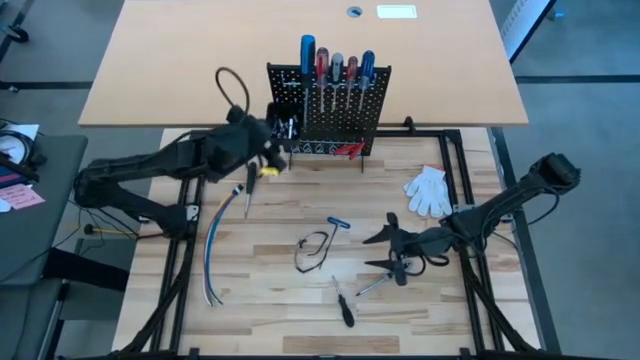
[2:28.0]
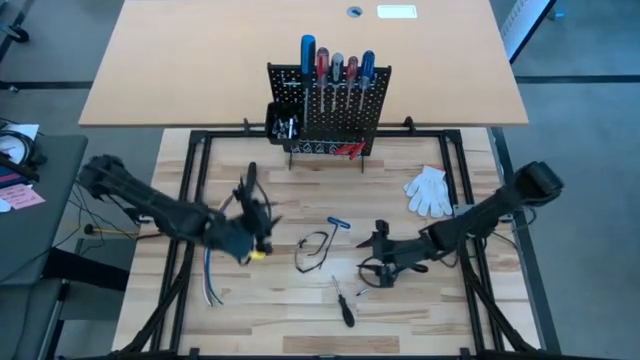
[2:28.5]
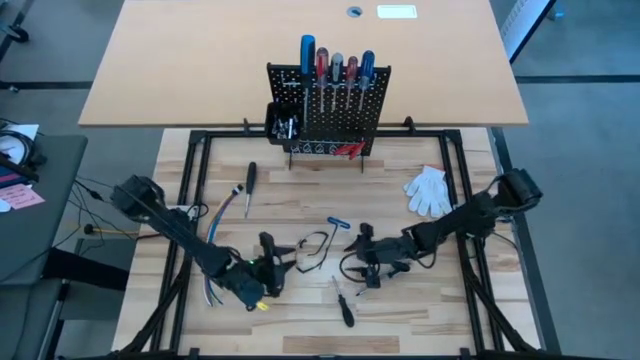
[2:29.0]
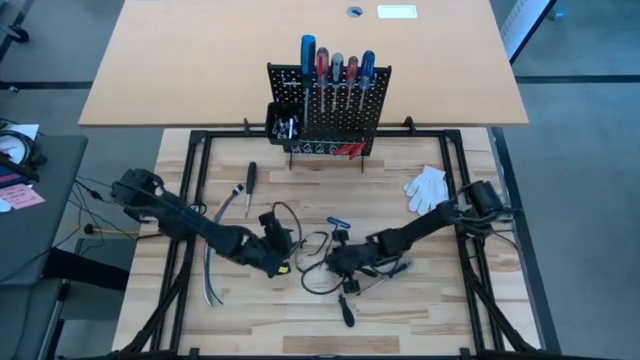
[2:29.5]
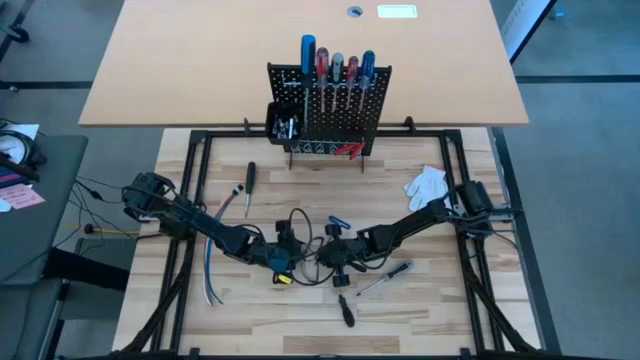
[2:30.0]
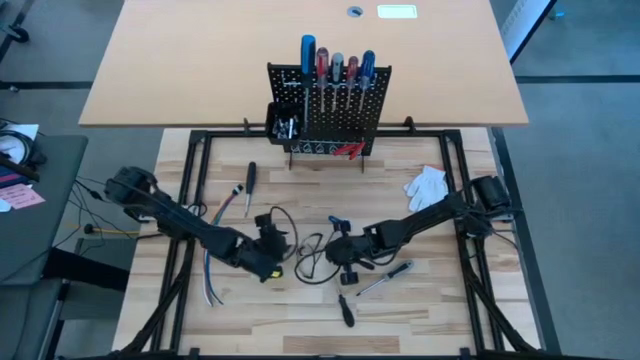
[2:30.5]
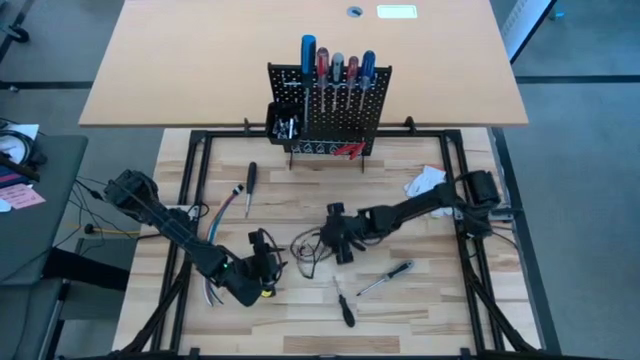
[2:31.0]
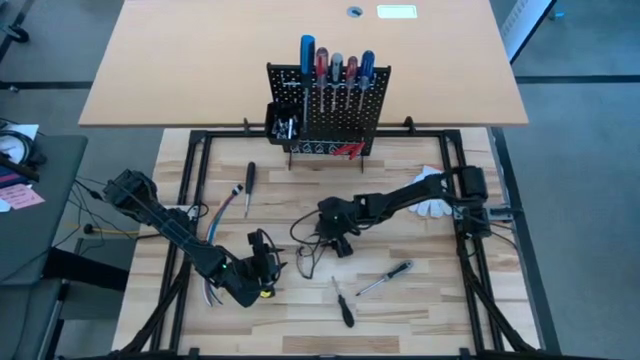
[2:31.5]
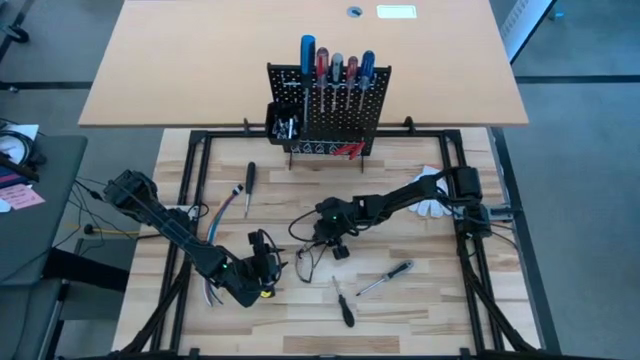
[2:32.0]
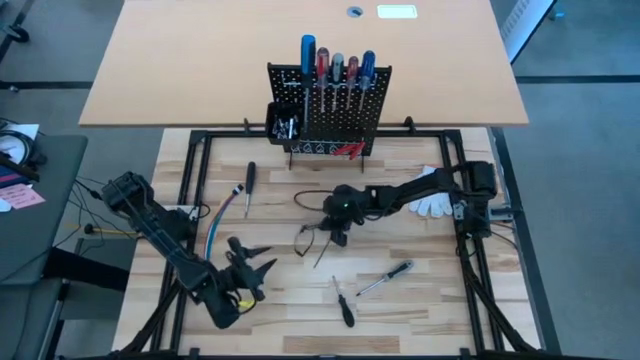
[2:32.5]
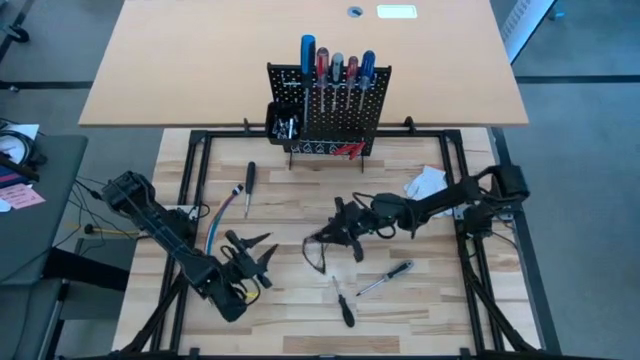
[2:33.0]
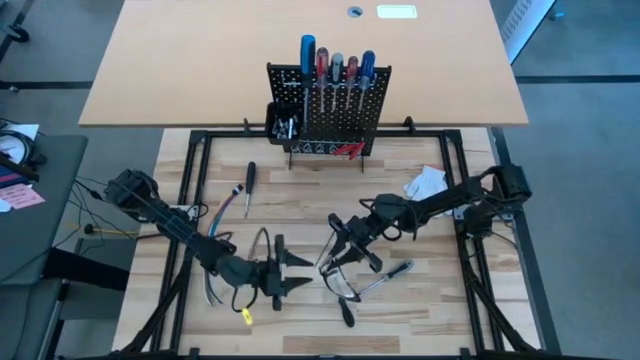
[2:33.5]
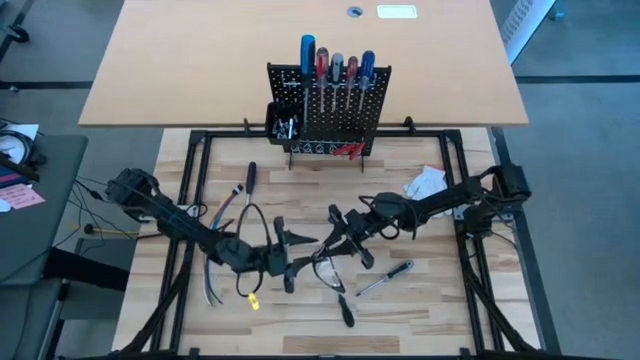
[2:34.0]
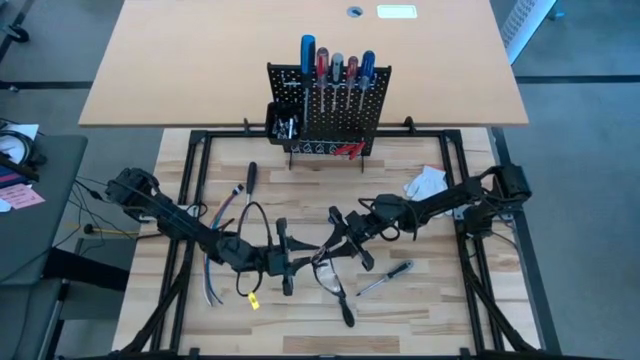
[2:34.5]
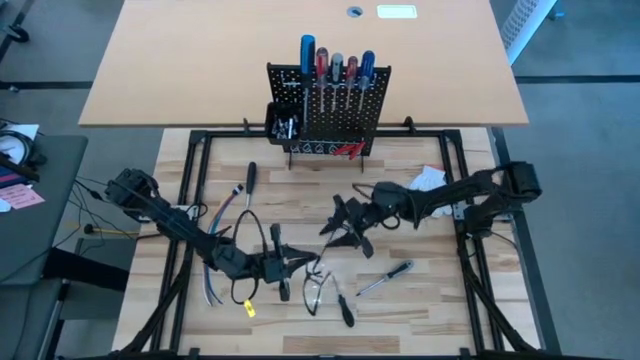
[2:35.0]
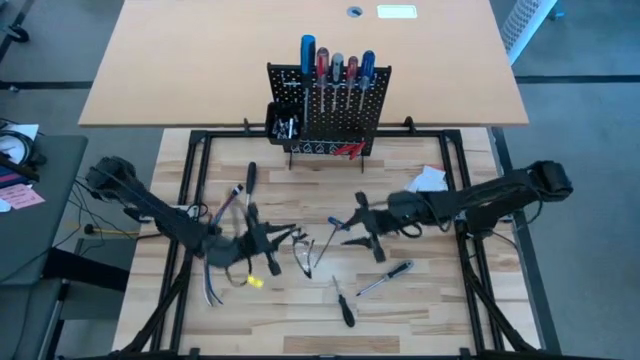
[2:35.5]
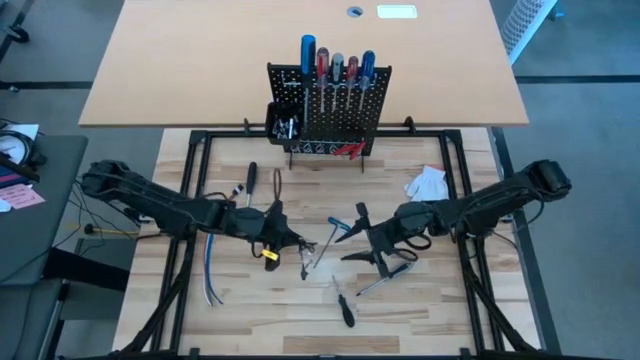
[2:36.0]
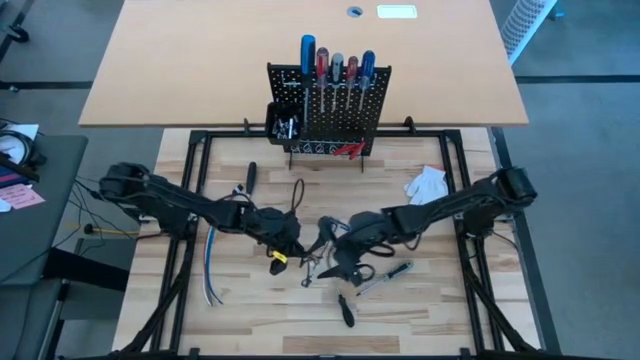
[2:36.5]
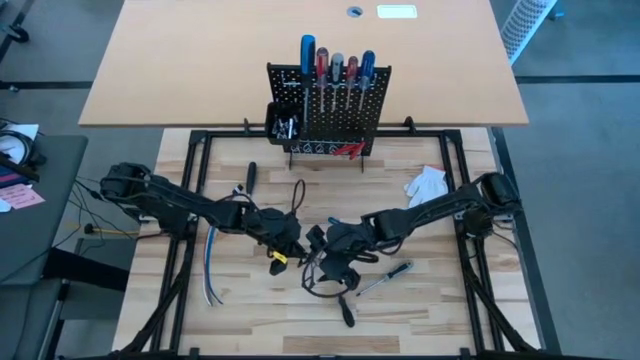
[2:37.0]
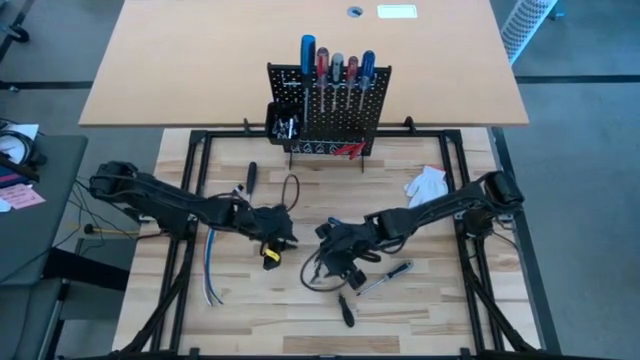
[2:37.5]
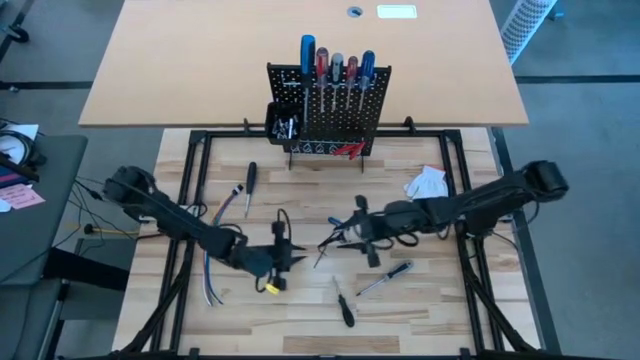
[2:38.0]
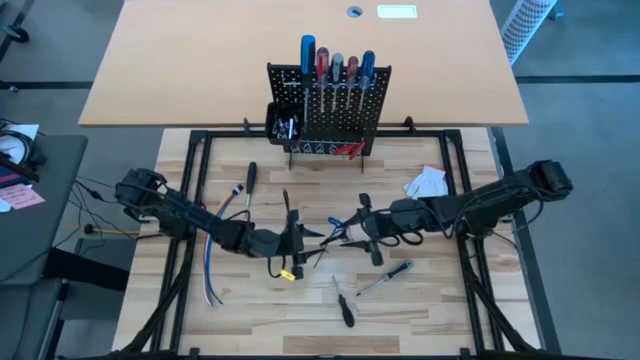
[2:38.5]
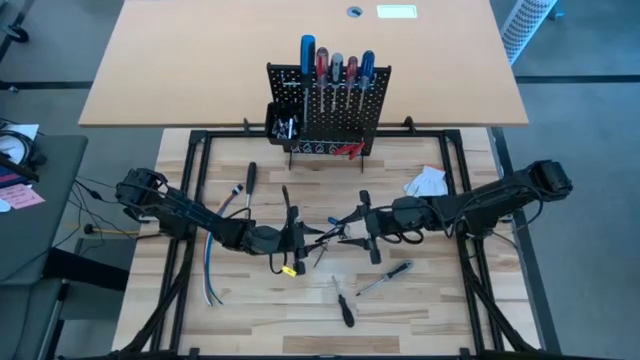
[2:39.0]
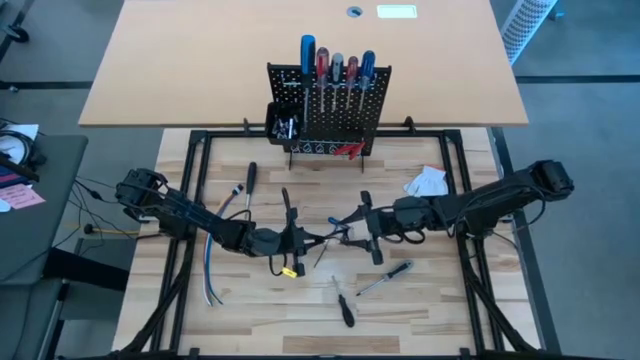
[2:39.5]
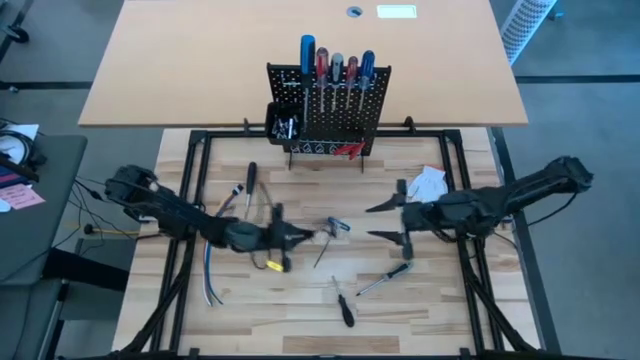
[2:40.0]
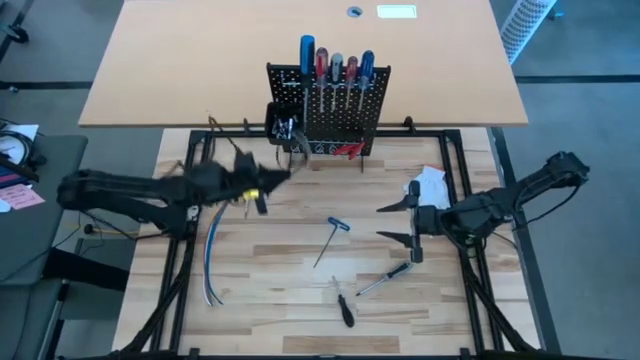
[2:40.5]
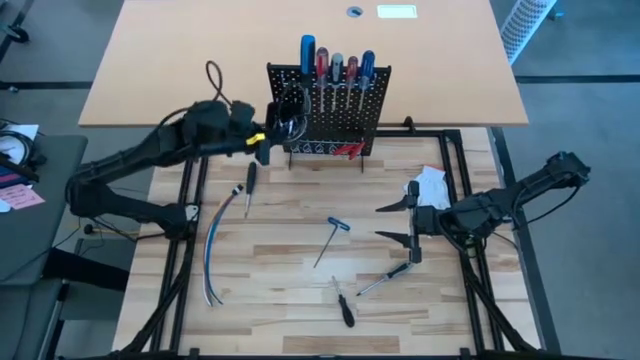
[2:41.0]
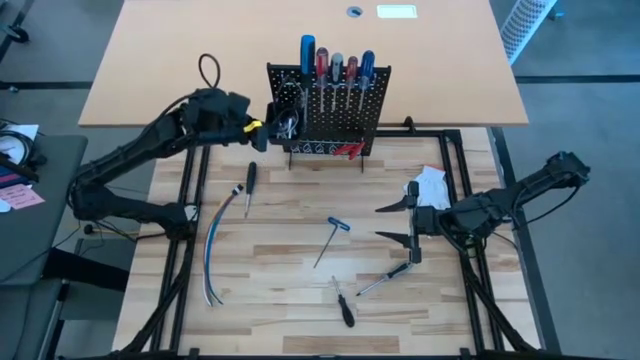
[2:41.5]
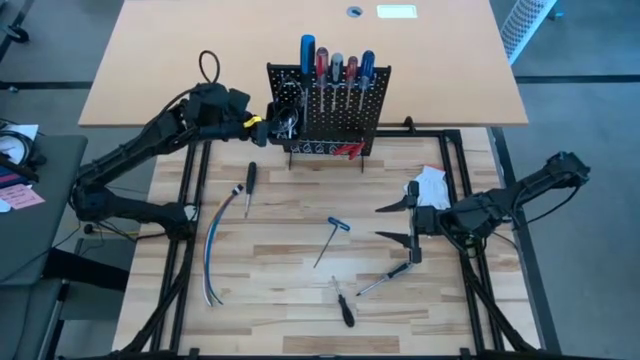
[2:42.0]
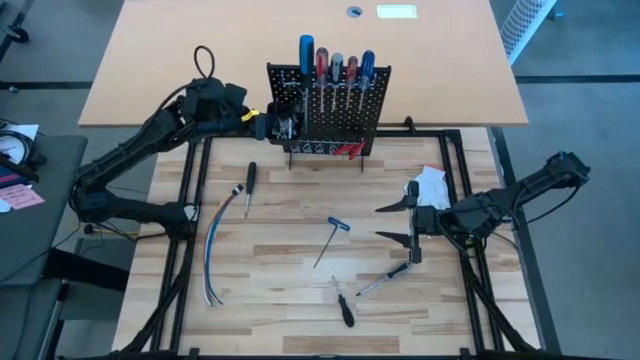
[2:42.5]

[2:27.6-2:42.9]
Task: Hang tools onto peg board
Hang the black safety glasses into the black bin on the black pegboard

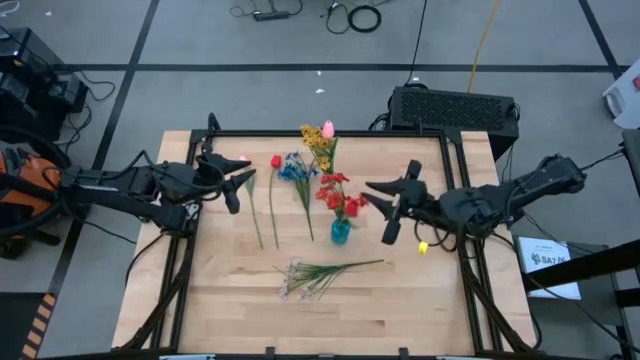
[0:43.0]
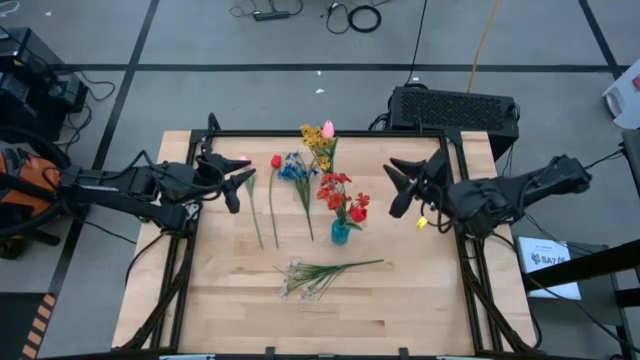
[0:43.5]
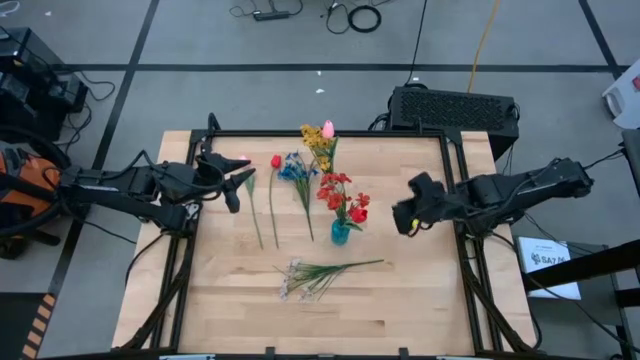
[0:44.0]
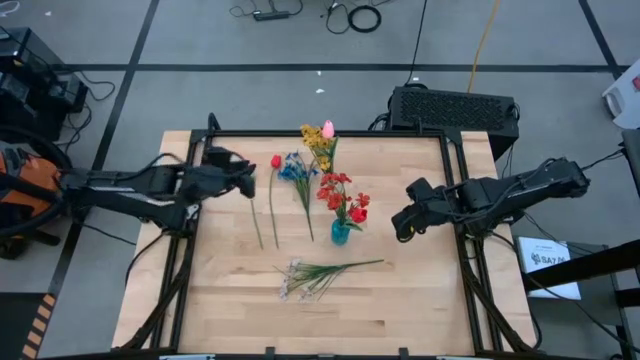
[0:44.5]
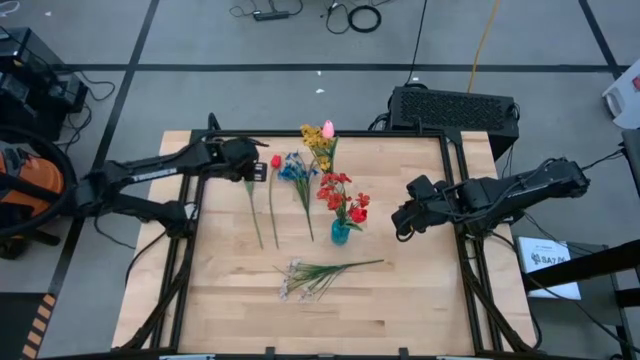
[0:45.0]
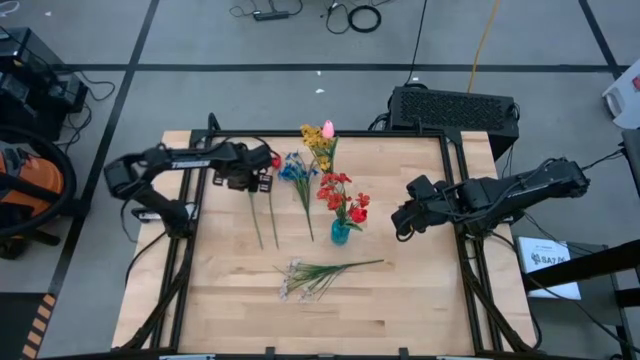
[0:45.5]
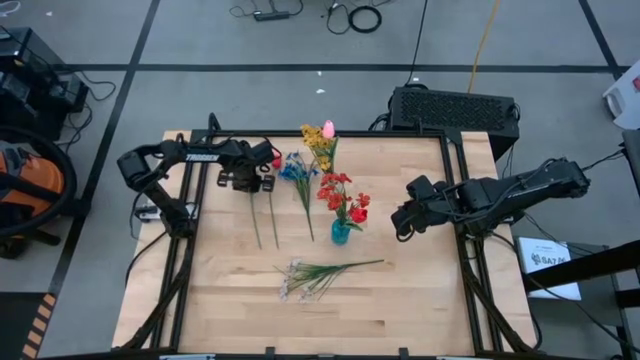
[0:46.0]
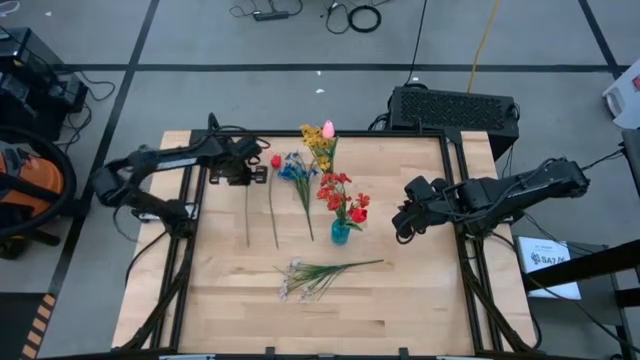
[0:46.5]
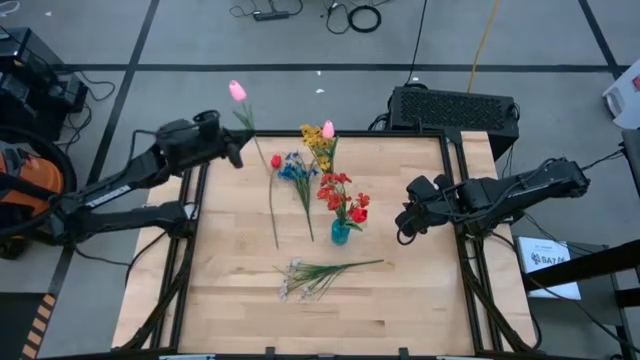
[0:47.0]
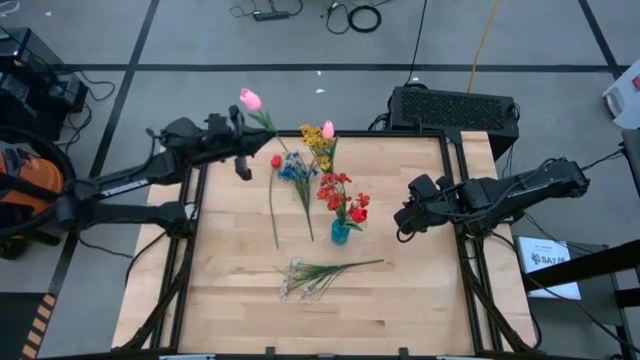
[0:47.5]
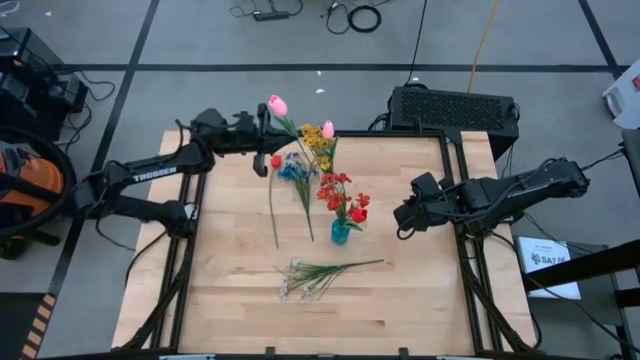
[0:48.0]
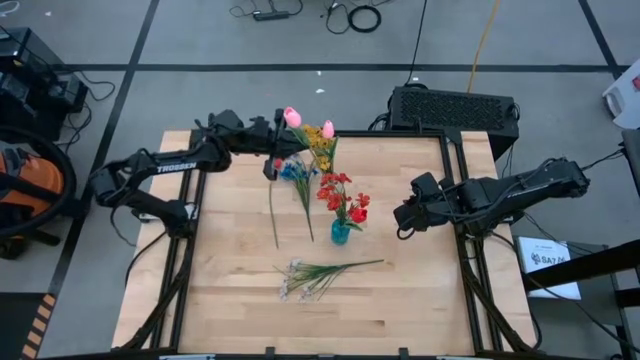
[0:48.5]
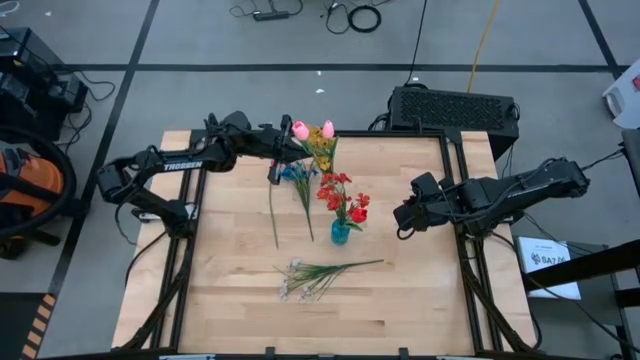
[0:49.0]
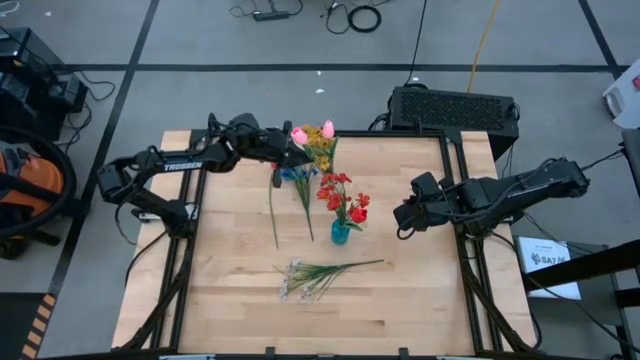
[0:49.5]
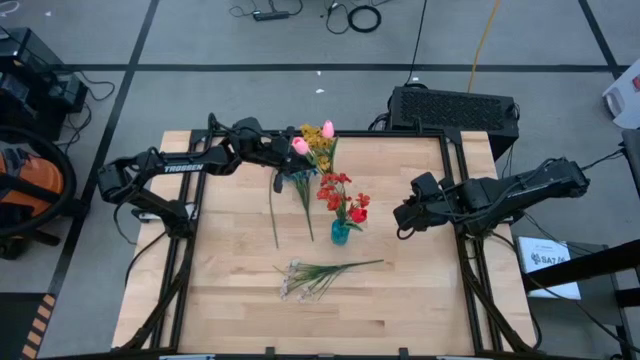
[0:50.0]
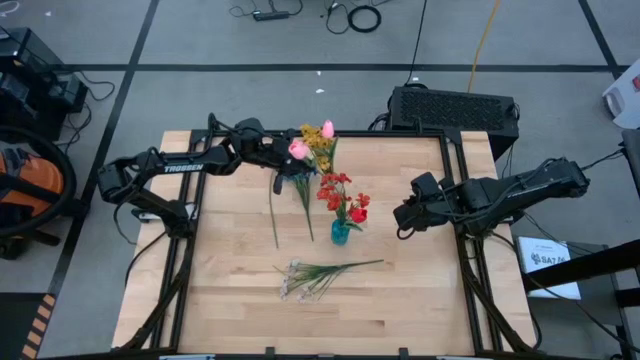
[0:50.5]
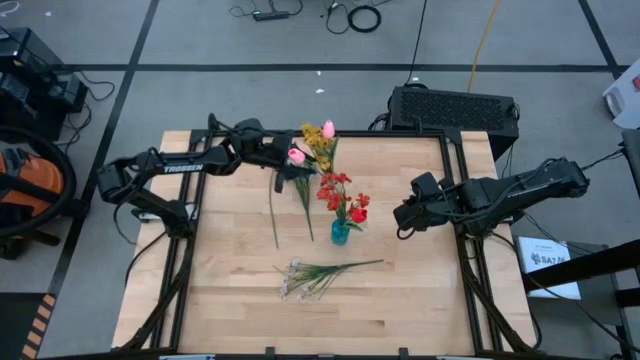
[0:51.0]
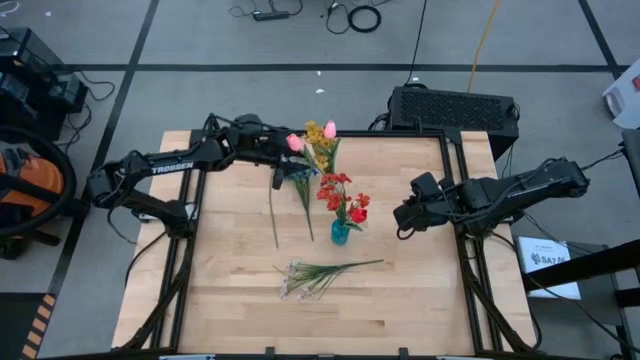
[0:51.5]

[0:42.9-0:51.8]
Task: Sort flowers into vase by color
Put the pink tulip into the transparent vase
